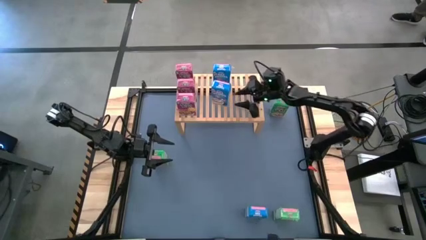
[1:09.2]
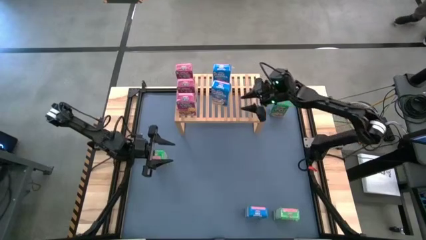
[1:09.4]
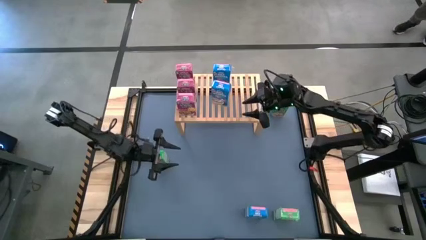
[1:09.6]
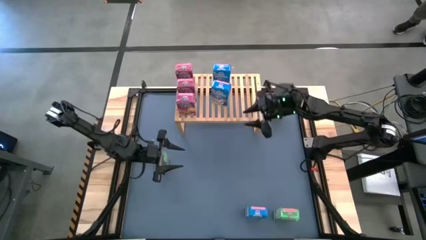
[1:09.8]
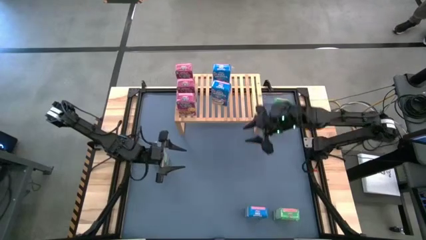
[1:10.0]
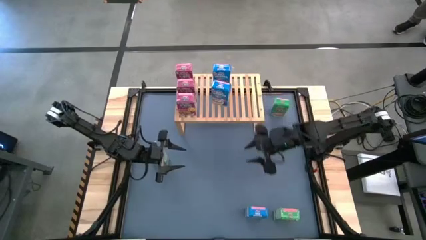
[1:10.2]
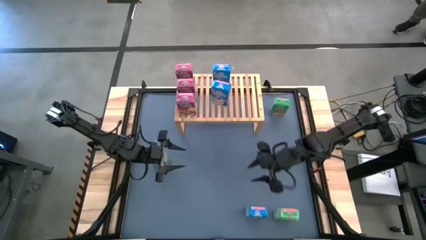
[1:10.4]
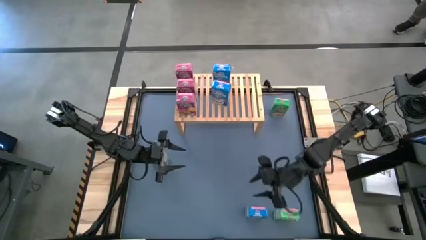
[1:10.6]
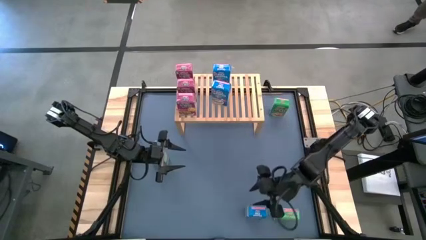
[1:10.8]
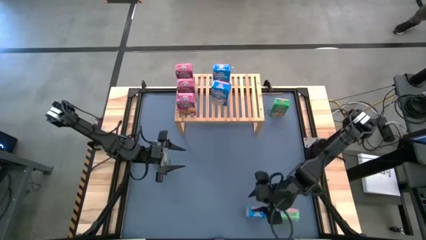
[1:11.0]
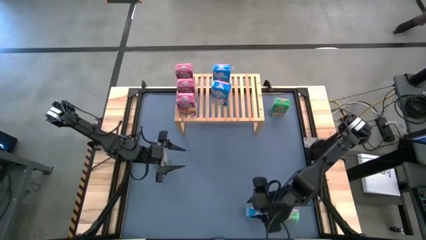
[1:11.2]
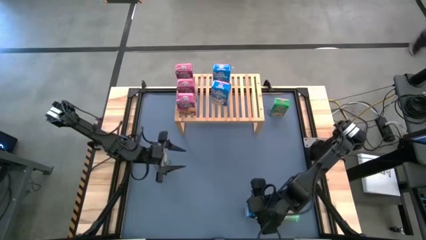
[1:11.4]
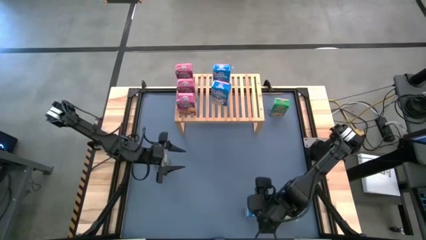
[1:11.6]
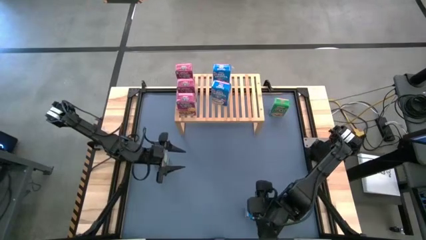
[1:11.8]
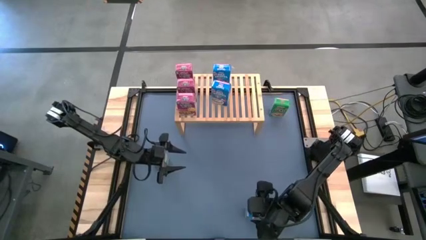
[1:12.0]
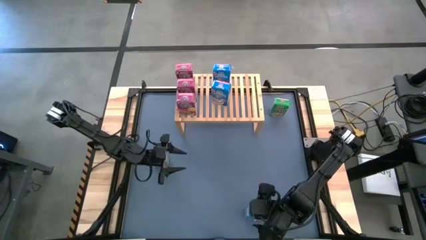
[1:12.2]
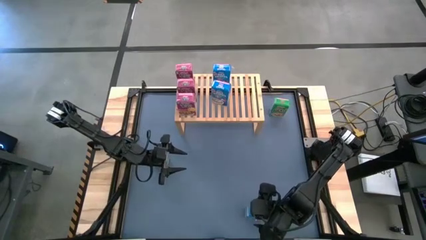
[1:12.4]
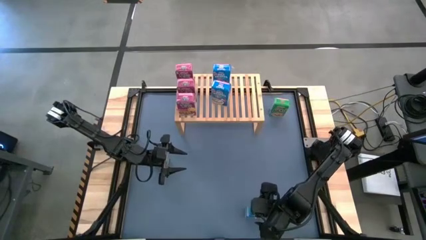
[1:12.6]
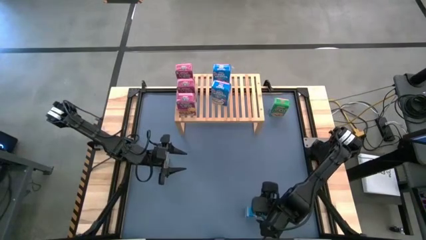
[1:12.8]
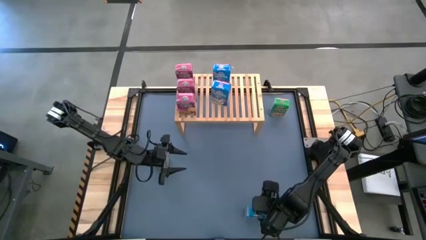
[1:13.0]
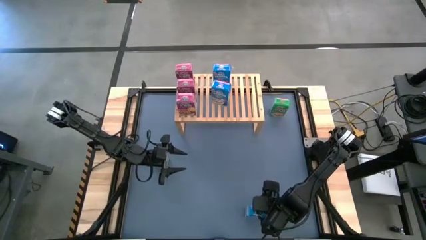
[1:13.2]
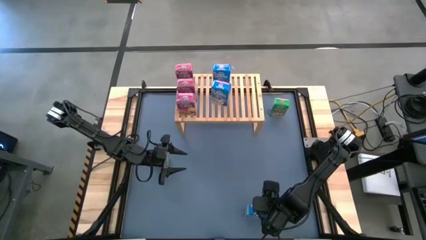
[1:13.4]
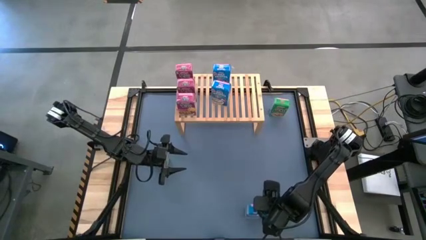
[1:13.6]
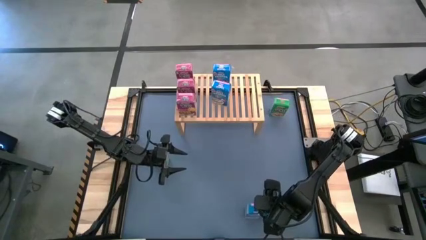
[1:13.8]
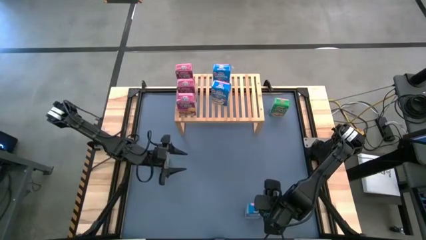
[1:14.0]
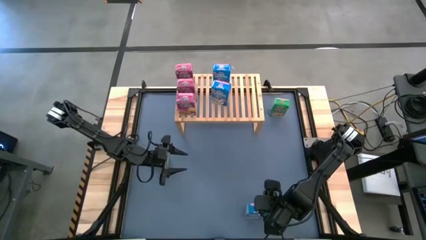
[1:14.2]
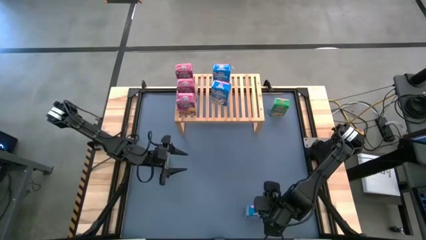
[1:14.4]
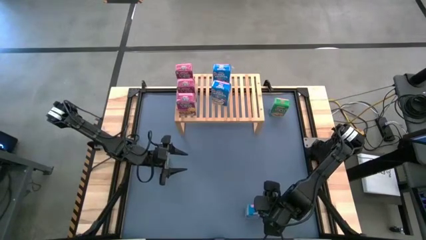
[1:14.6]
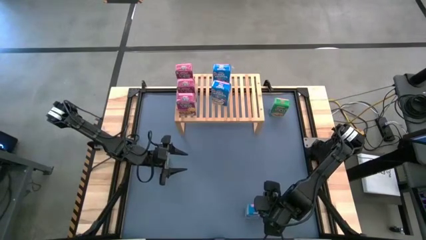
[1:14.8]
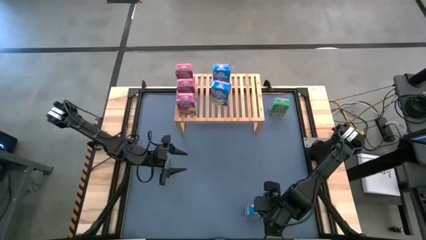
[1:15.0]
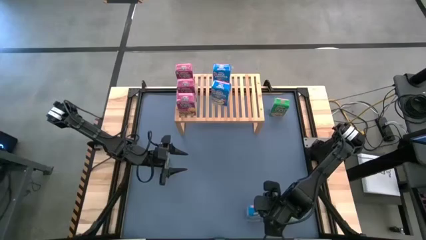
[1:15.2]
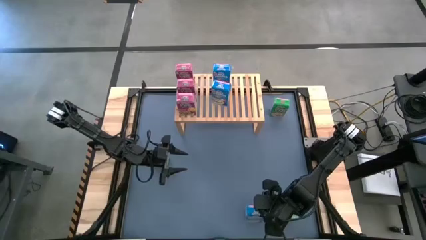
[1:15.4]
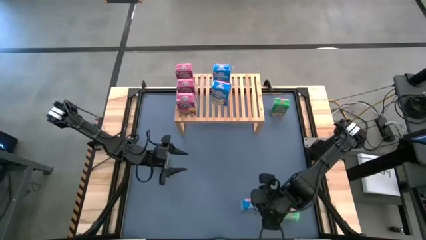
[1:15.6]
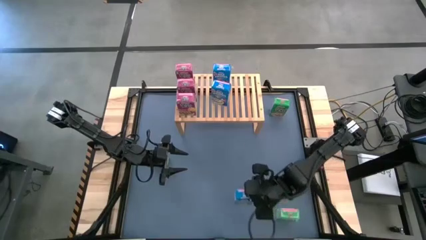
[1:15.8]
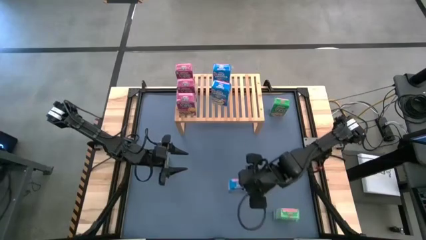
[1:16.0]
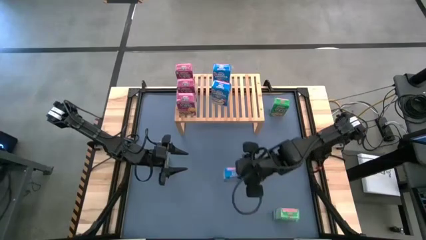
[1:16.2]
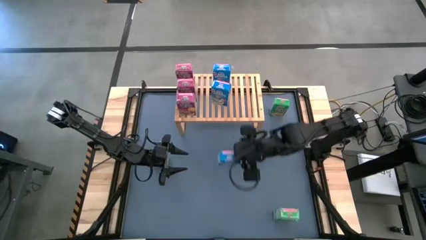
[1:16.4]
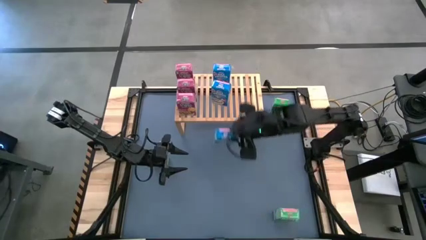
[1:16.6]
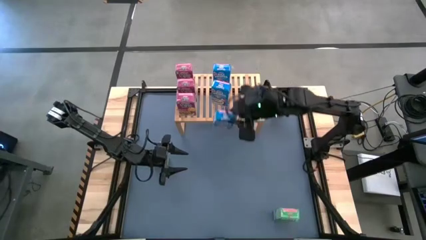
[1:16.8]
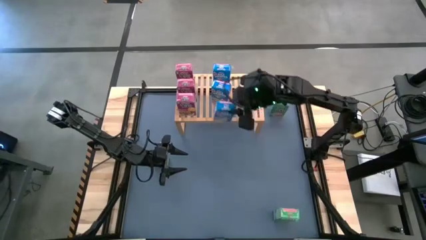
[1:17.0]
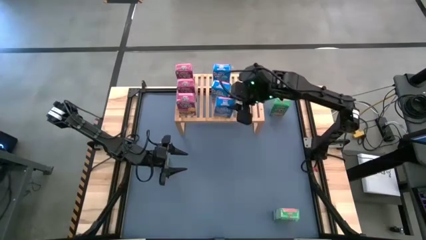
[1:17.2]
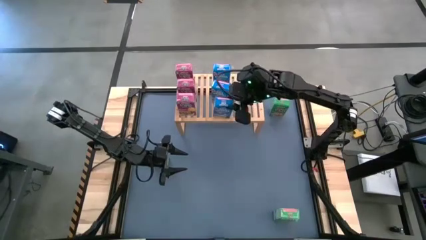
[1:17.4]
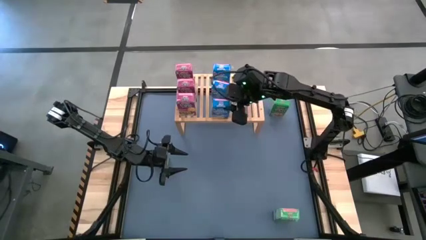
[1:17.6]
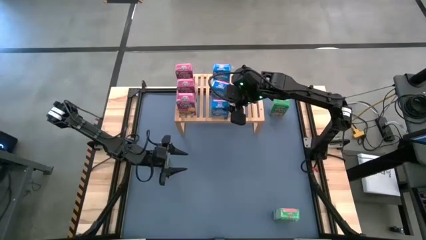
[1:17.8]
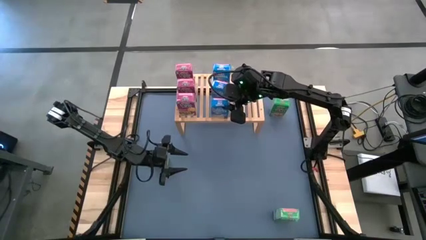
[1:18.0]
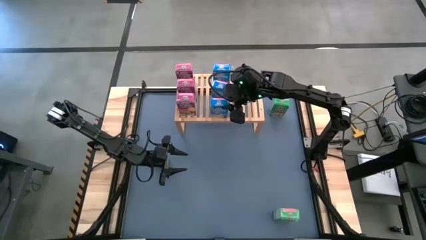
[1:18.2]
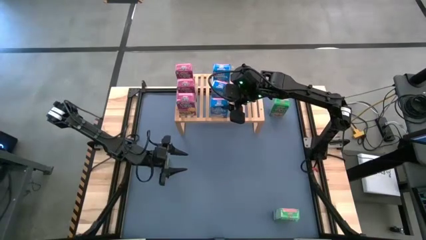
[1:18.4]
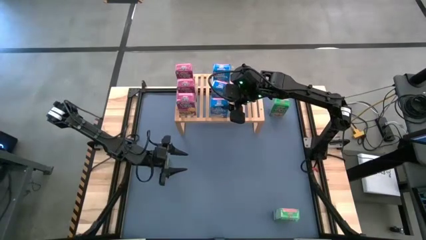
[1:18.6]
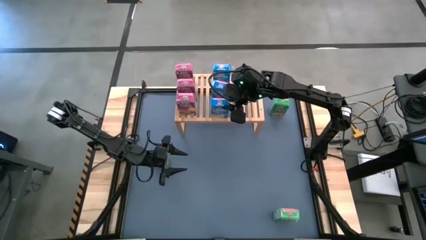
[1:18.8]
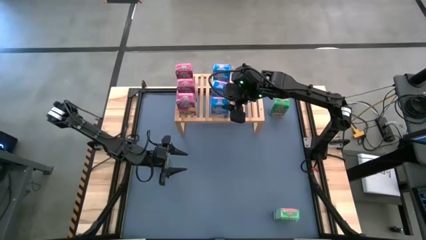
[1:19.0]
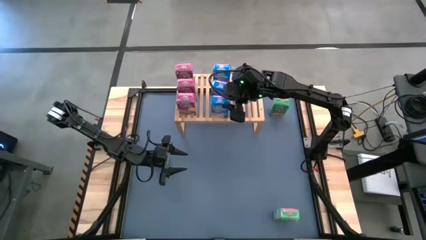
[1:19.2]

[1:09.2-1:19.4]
Task: Stack cereal on shelf
Put the blue cereal box on the shelf aligned with the other blue cereal boxes

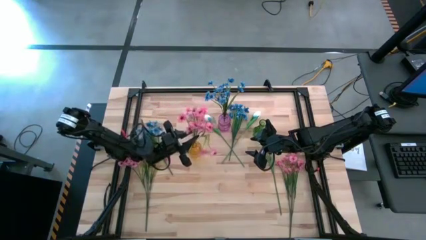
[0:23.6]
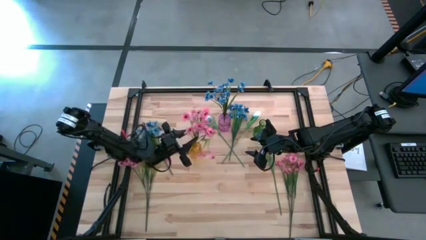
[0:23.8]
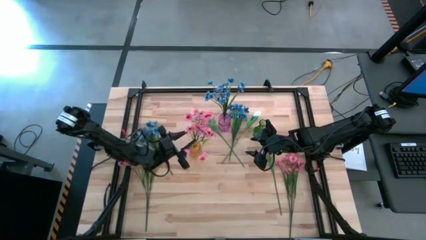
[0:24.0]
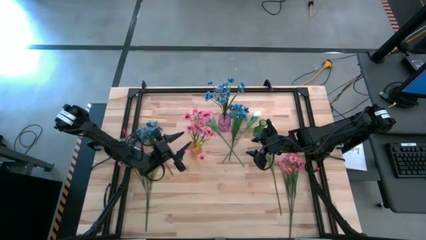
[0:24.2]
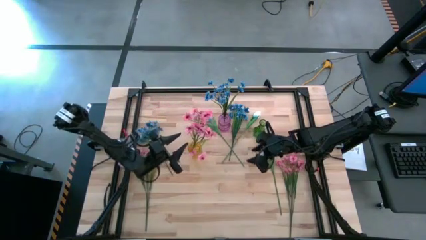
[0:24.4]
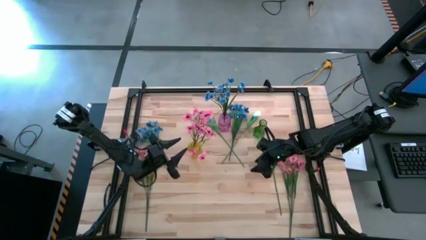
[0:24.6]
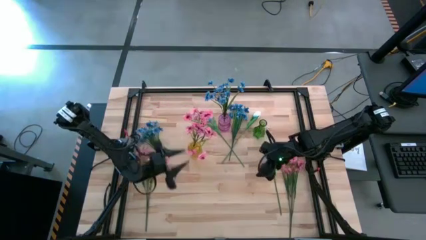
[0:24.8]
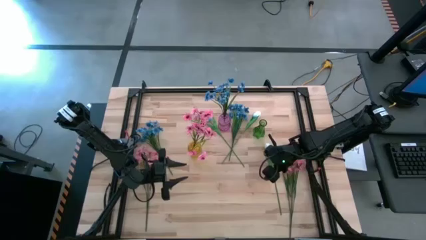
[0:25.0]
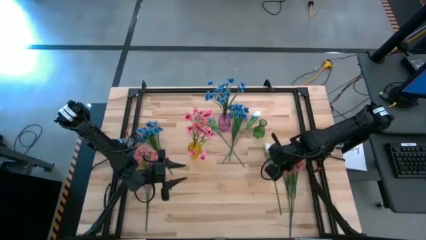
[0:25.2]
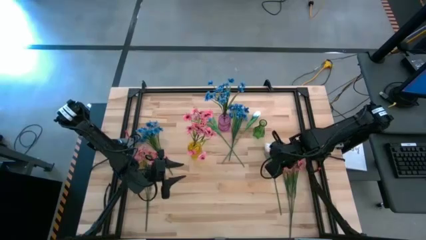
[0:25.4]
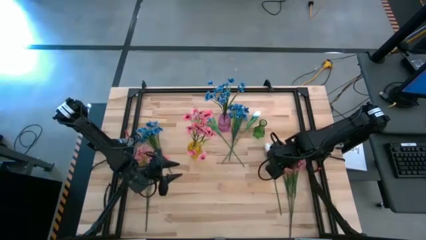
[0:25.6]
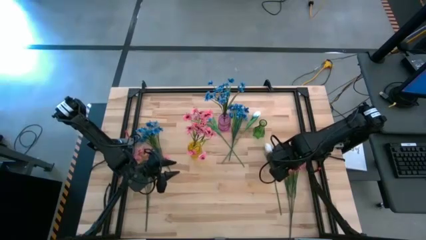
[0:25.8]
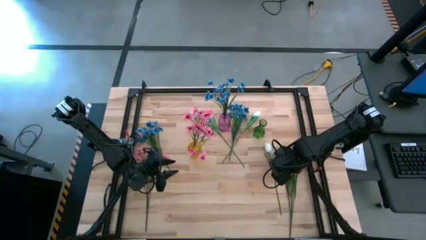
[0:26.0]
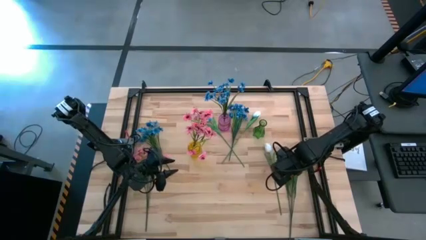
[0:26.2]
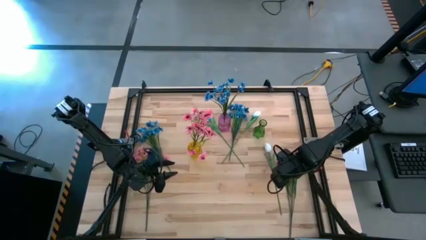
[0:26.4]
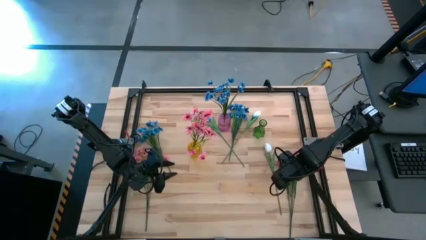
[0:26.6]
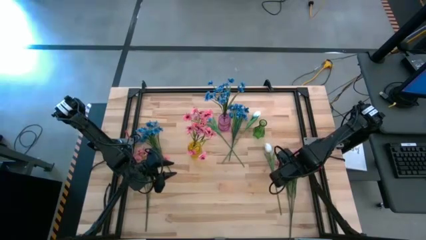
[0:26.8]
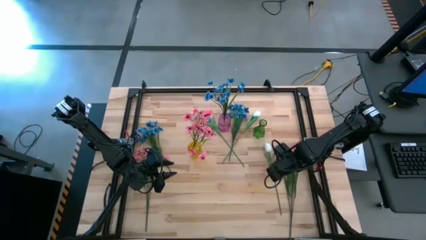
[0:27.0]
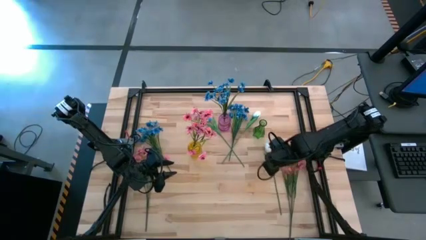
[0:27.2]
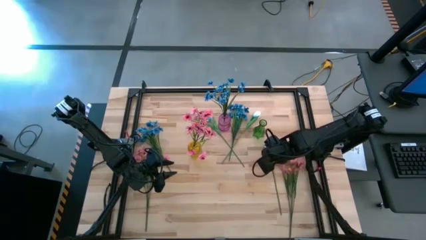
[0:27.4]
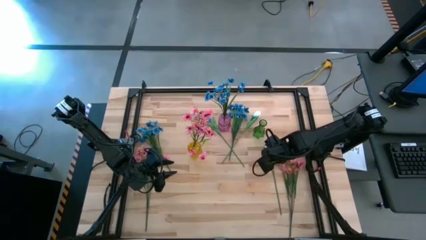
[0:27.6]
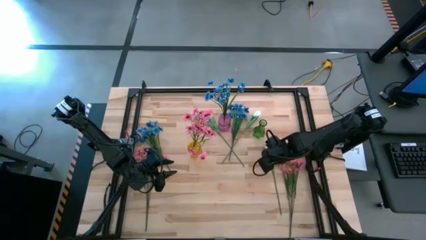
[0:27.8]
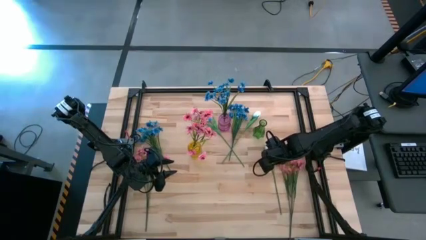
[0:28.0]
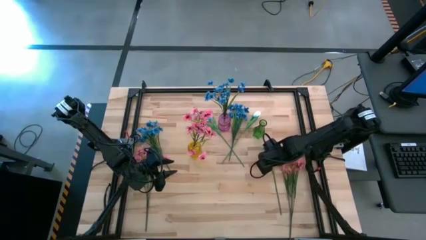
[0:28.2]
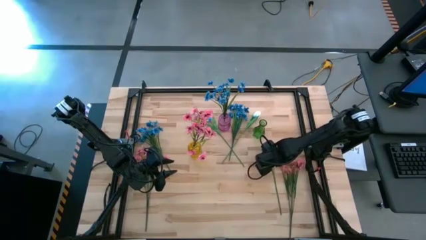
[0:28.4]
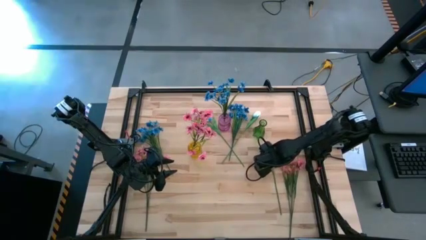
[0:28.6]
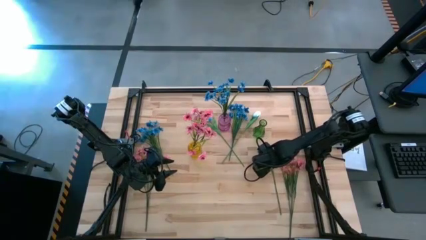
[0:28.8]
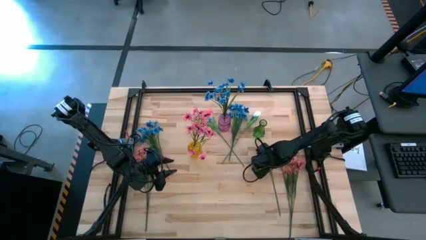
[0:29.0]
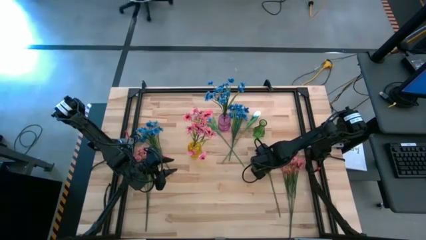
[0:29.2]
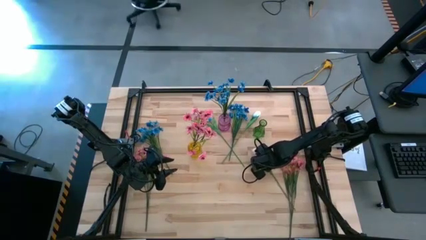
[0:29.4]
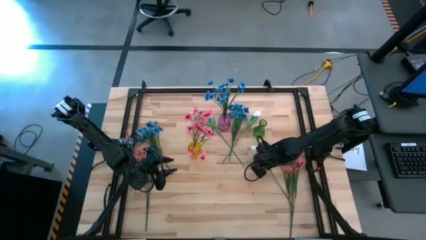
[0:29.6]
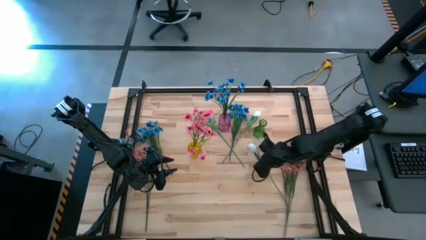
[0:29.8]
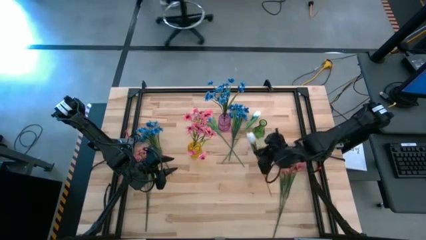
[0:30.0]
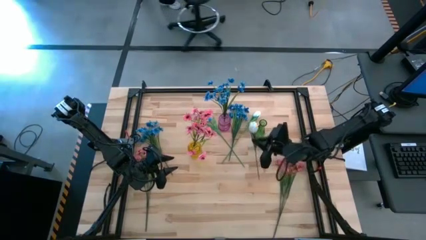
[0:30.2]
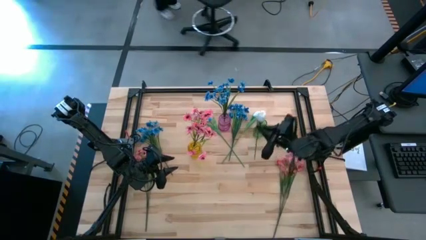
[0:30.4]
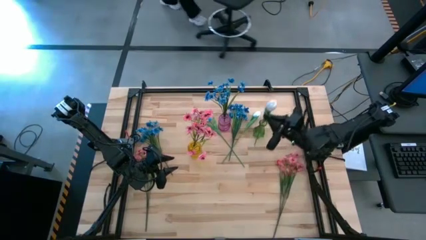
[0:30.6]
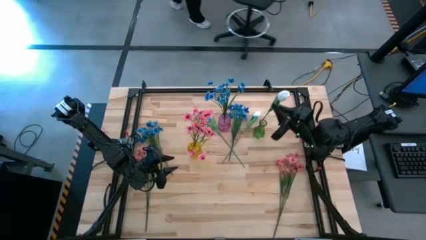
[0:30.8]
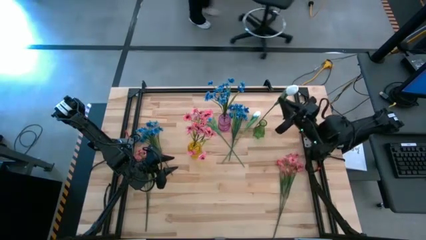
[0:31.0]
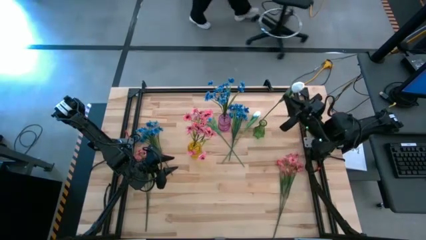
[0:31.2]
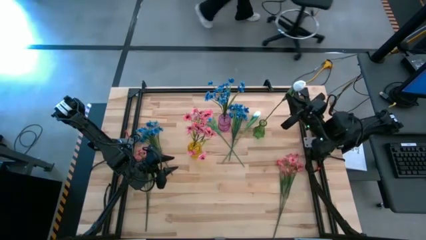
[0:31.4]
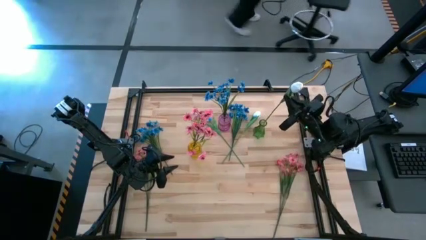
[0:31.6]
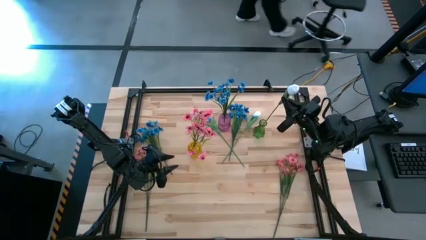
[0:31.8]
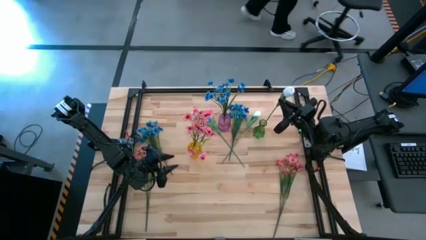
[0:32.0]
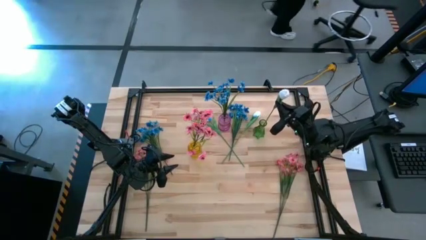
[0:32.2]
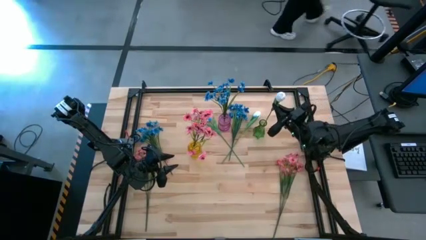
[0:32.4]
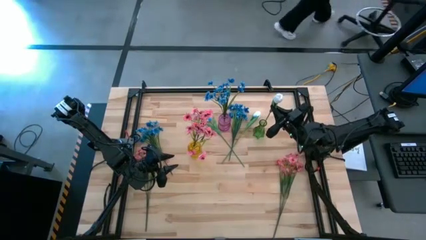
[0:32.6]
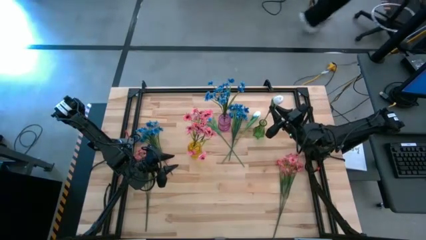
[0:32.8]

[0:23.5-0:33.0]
Task: Sort flowers into vase by color
Put the bottom white right flower into the green flower vase
